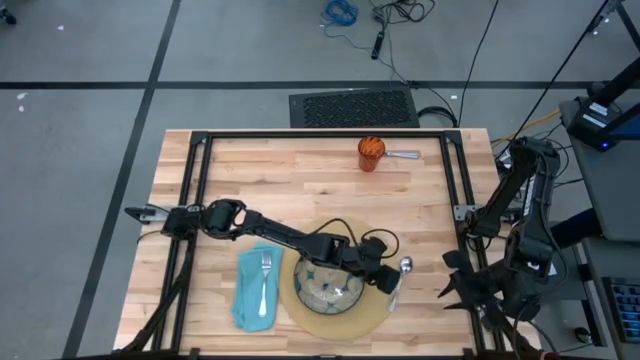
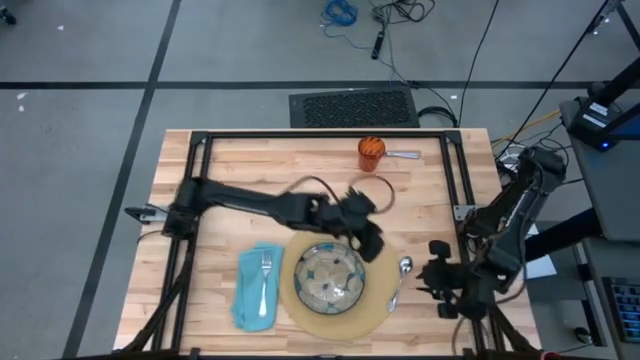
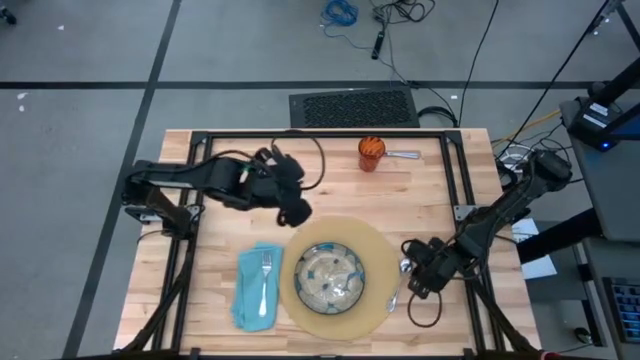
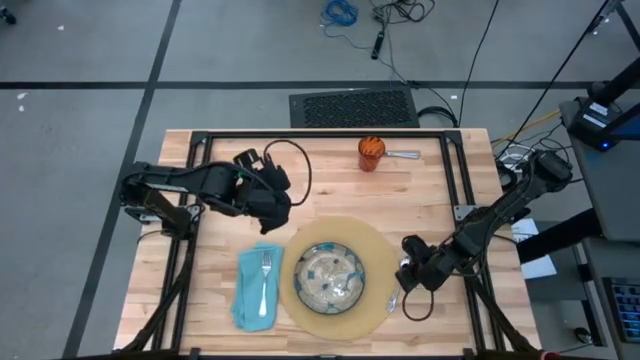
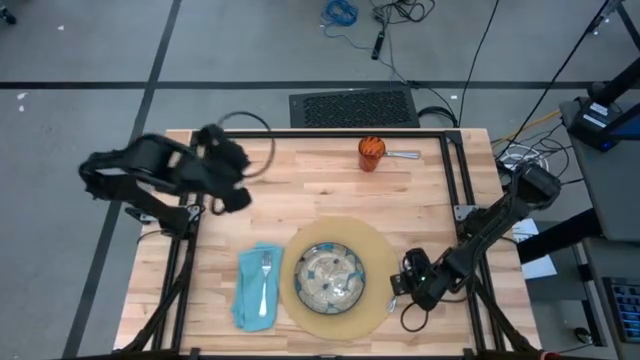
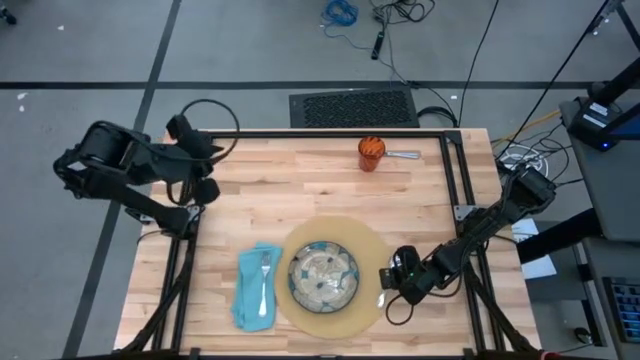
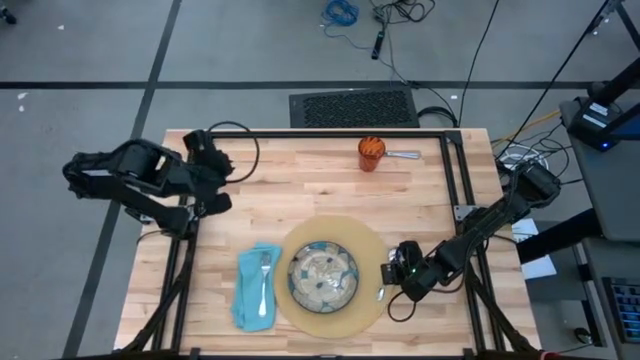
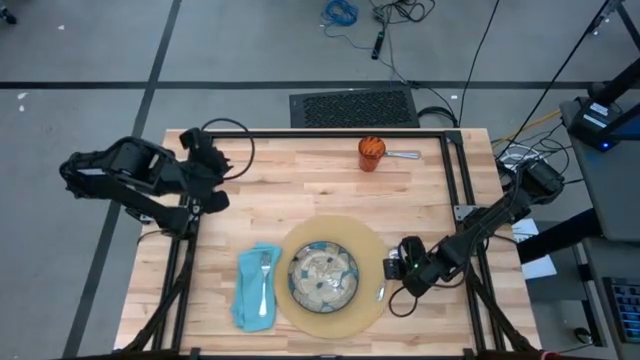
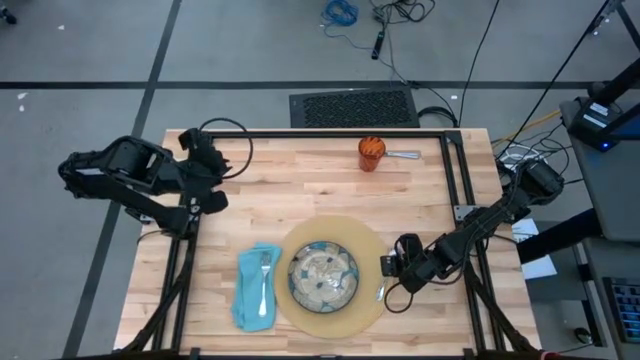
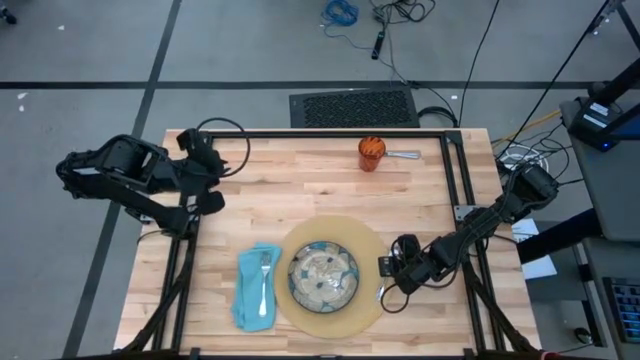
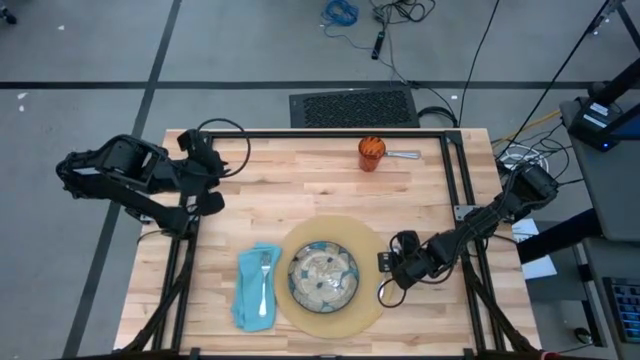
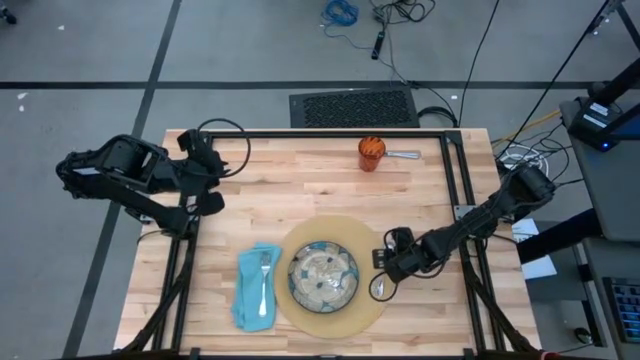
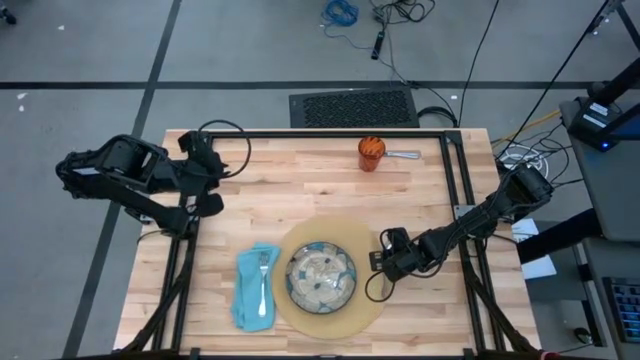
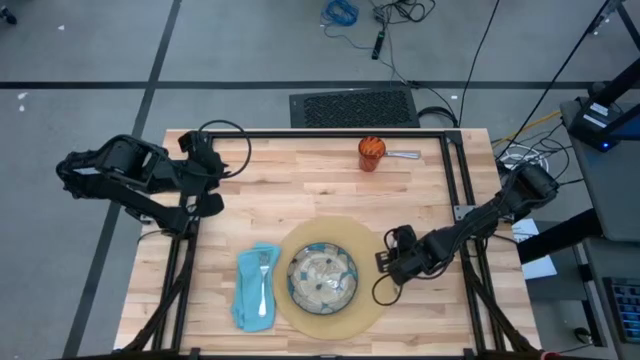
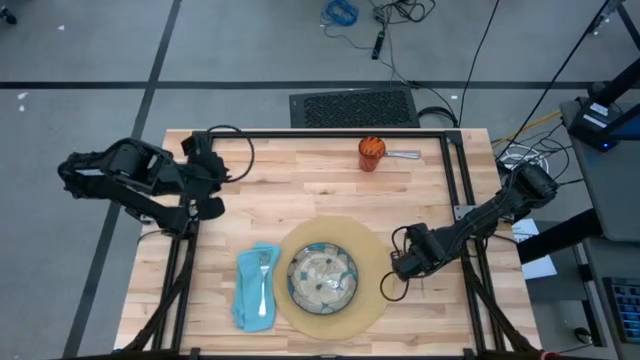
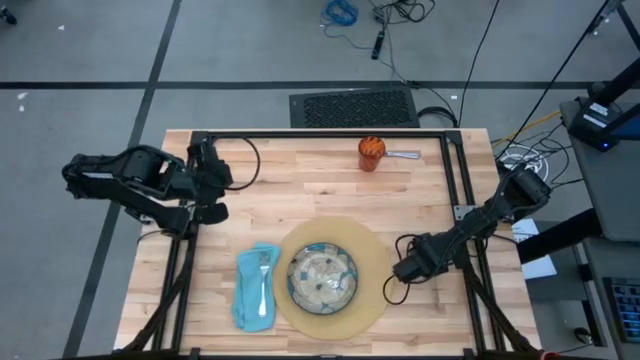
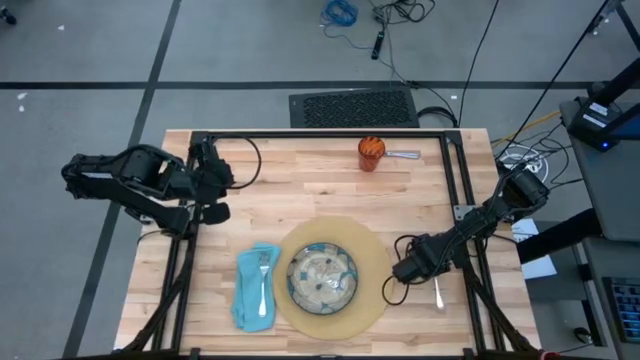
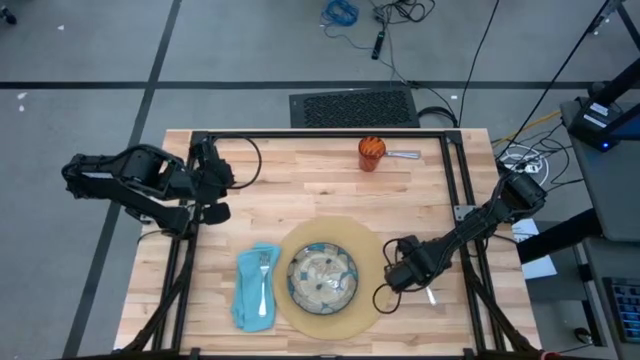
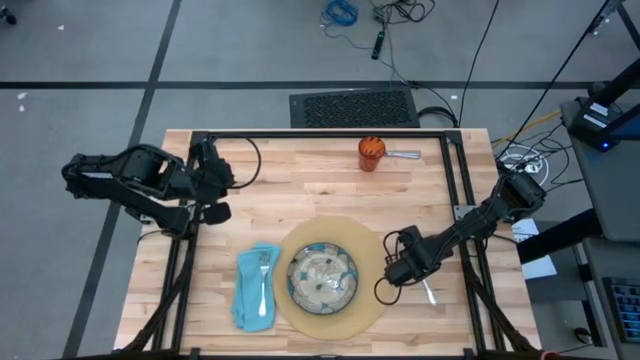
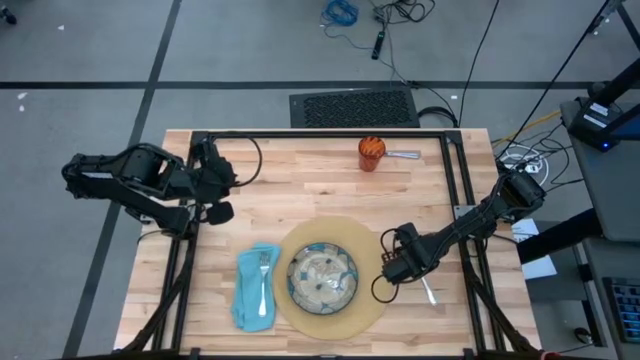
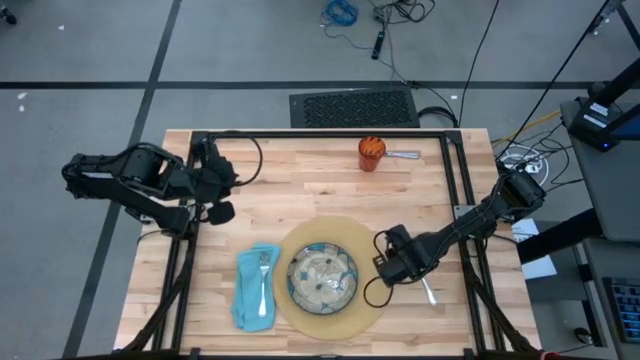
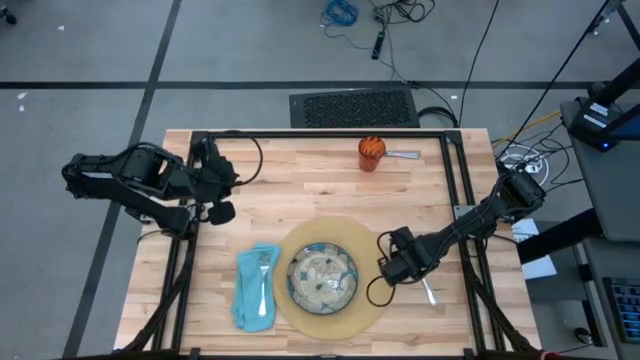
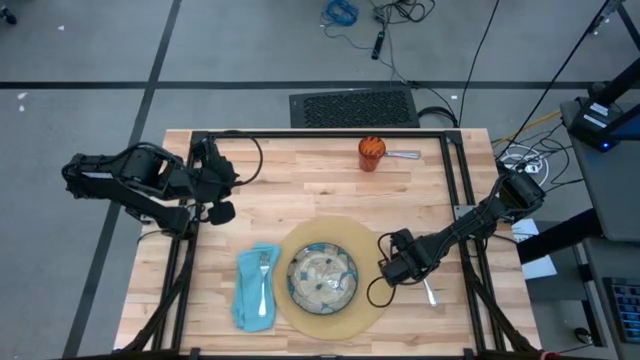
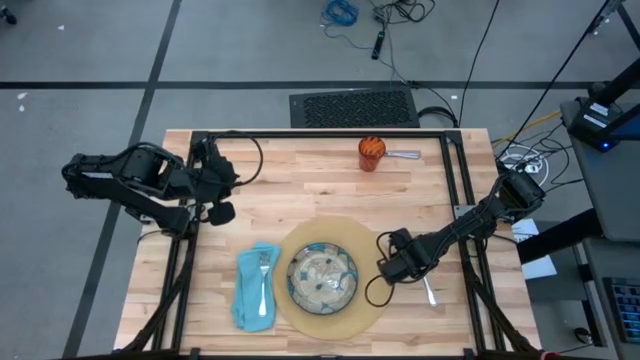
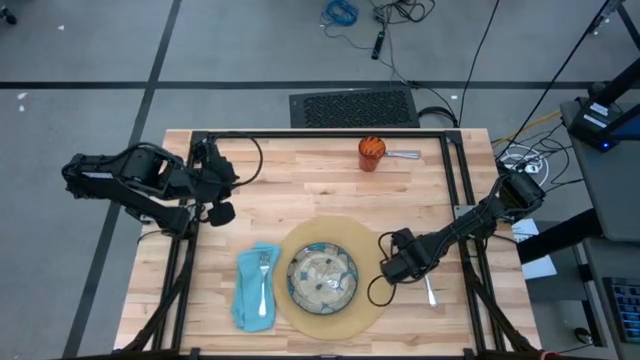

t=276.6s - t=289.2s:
Task: Set table place
Move the silver spoon to the right side of the brown mat

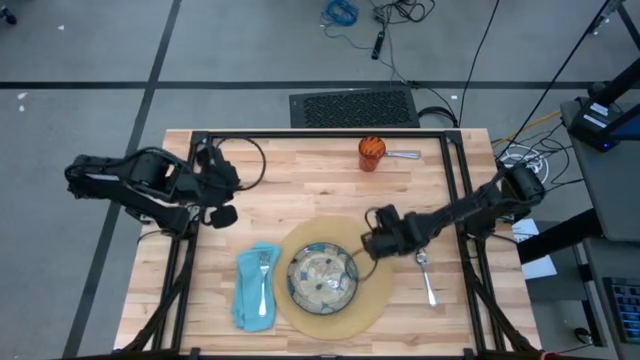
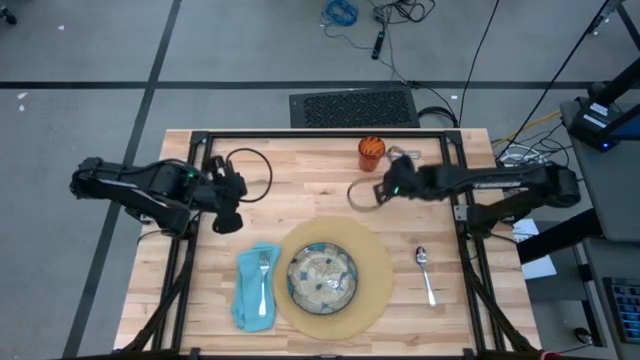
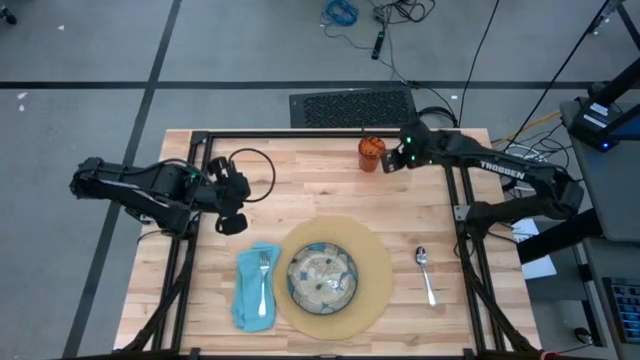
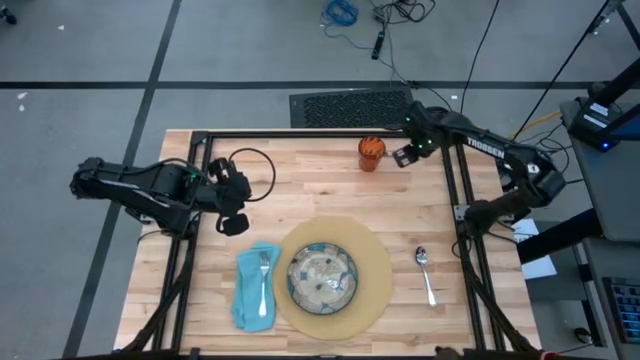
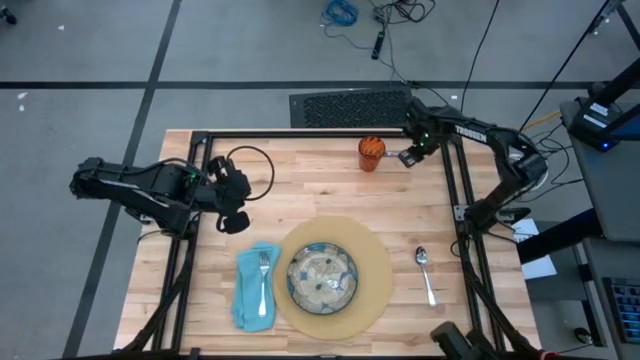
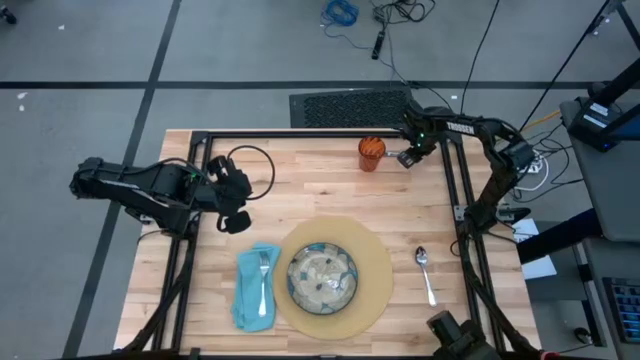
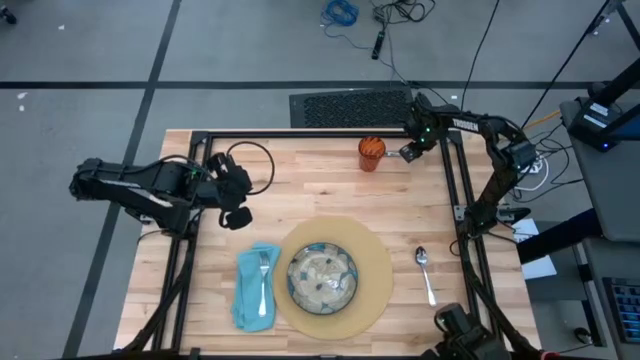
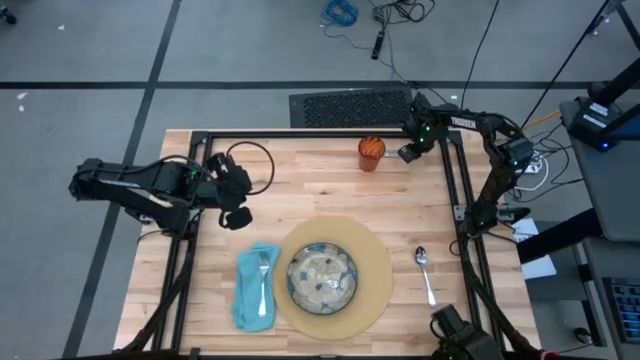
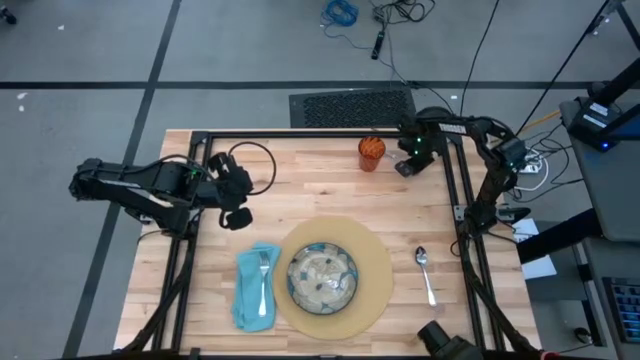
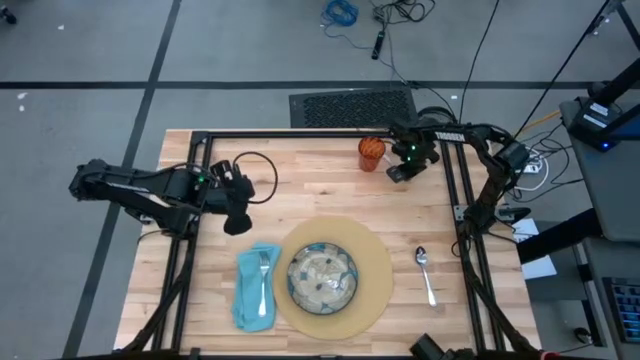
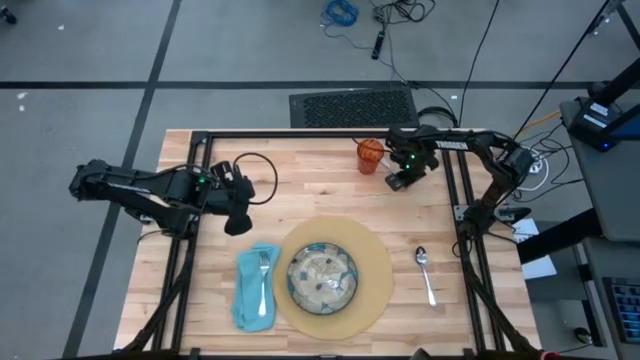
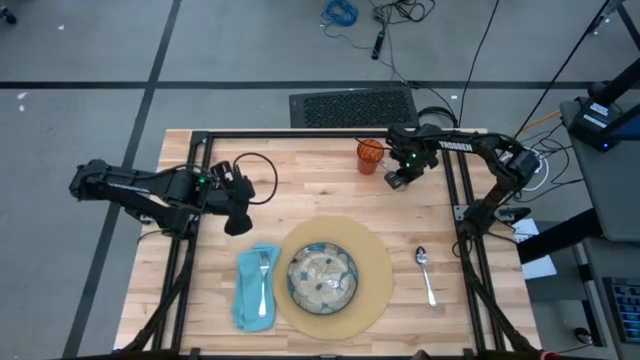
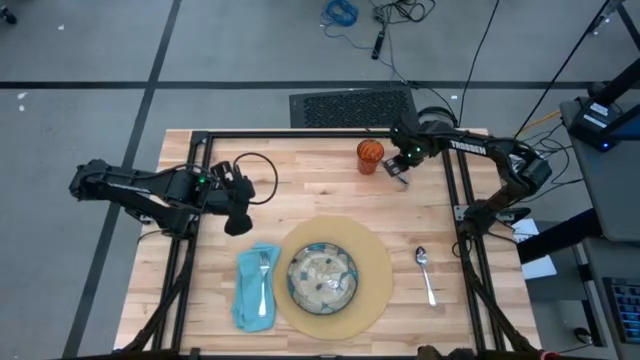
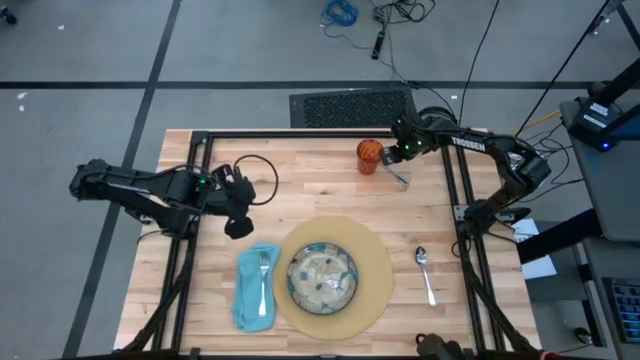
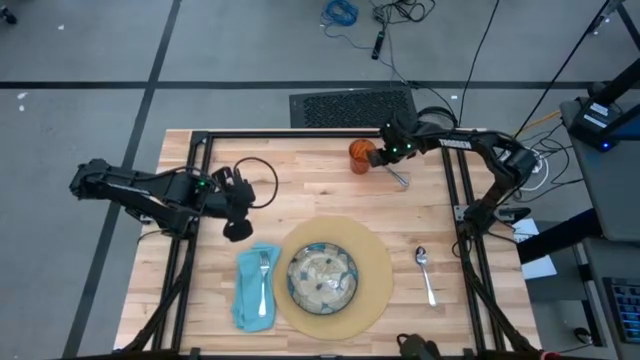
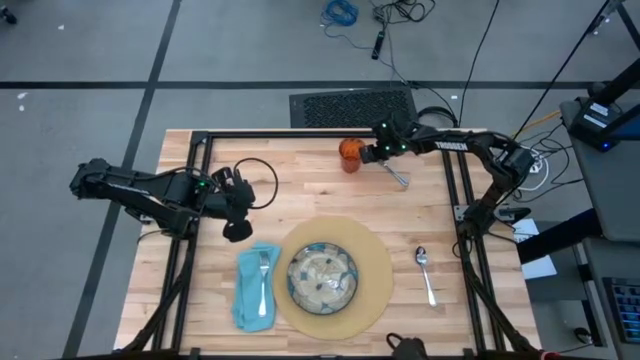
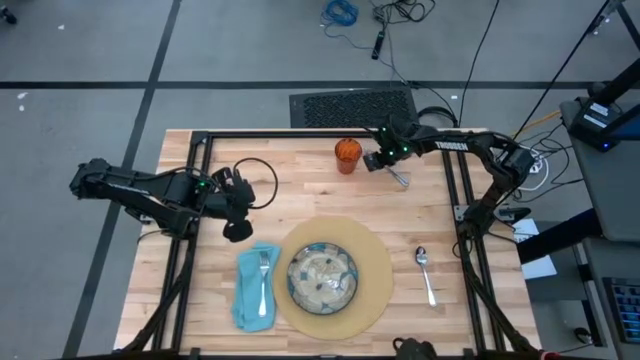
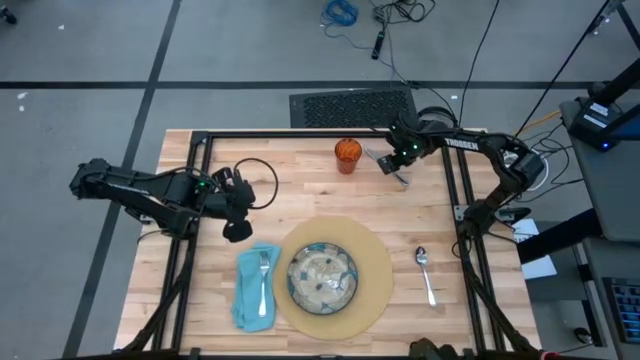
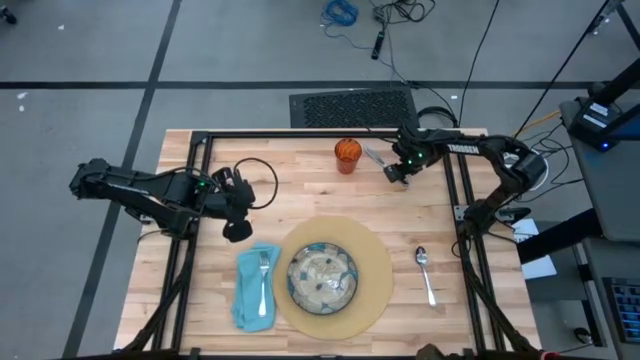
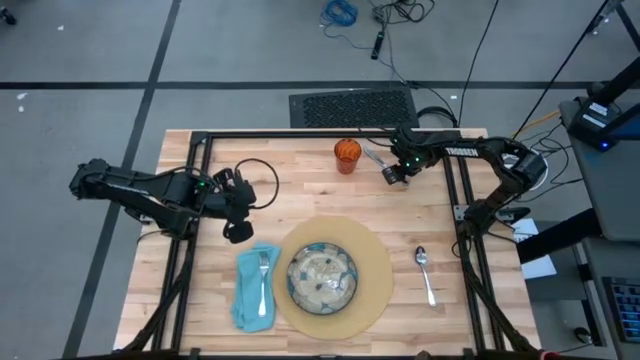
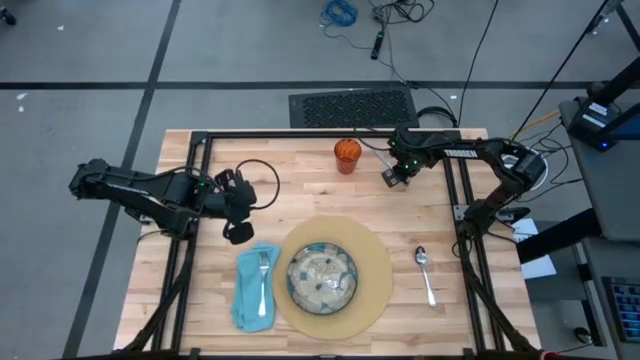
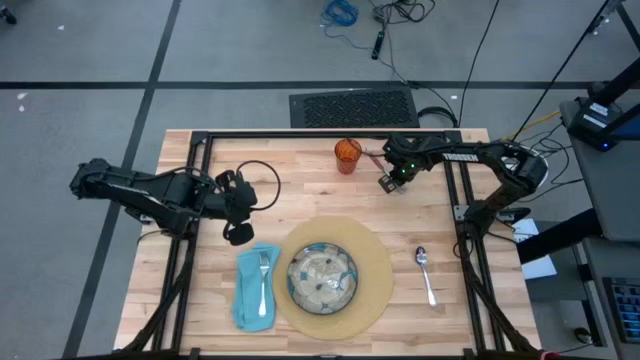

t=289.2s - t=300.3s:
Move the silver knife to the left side of the silver spoon
